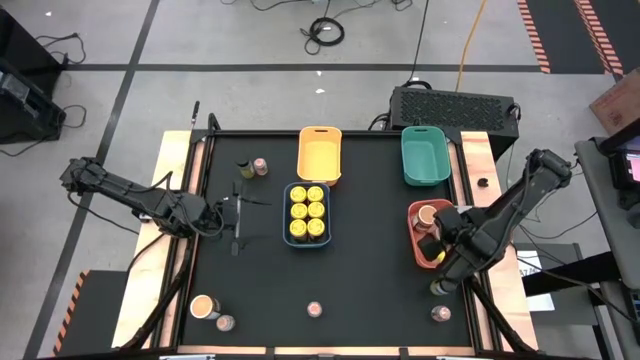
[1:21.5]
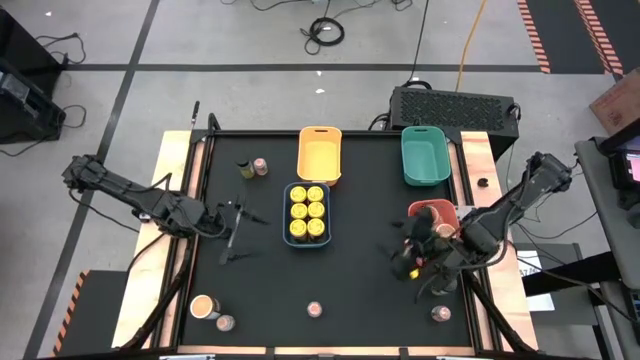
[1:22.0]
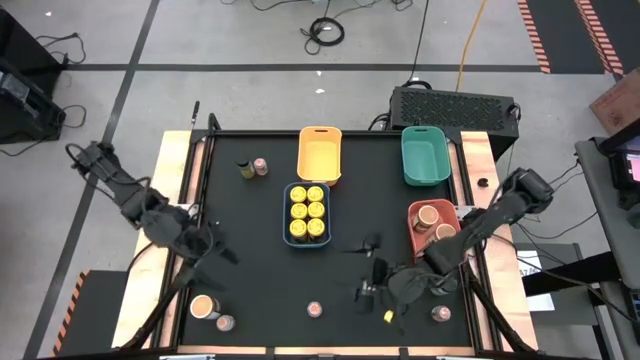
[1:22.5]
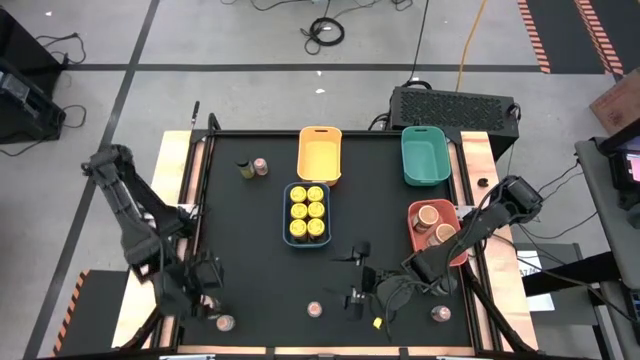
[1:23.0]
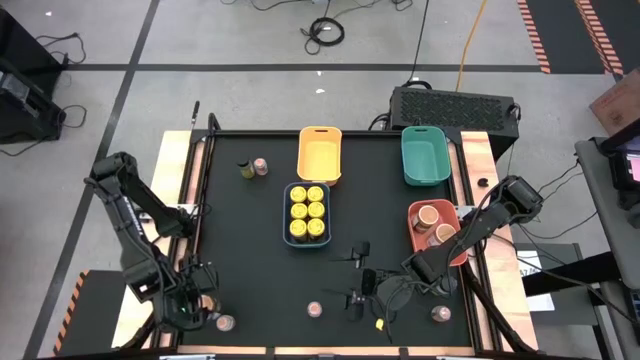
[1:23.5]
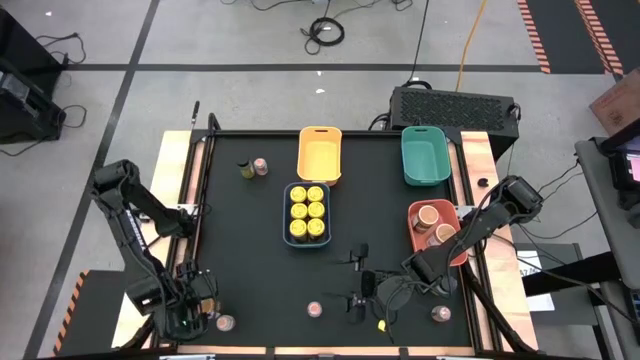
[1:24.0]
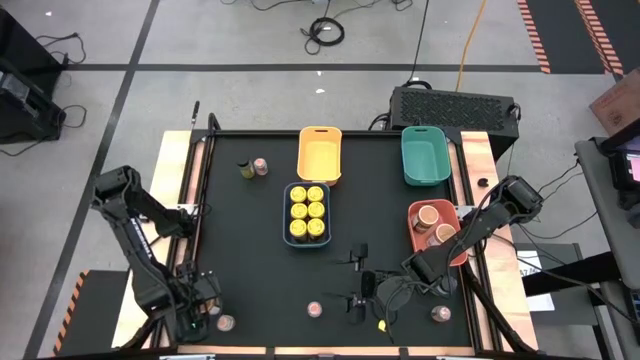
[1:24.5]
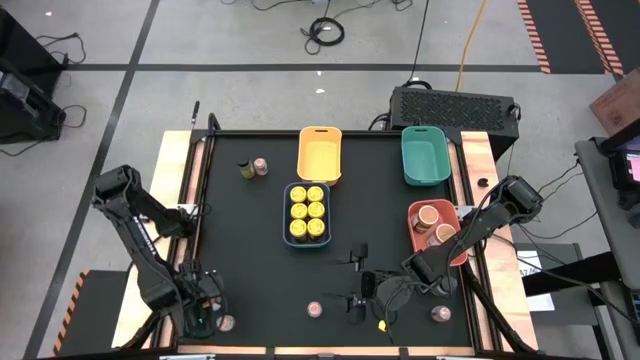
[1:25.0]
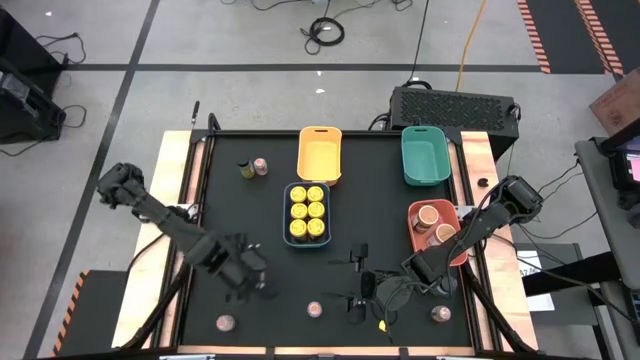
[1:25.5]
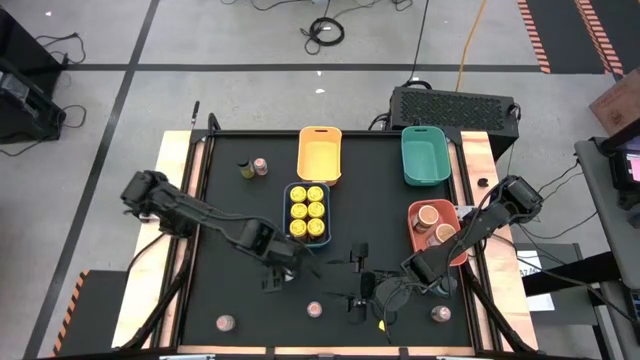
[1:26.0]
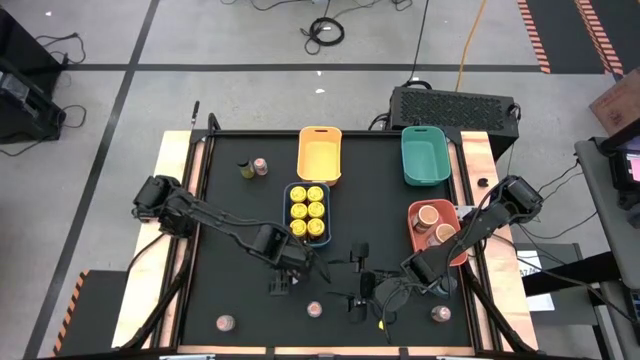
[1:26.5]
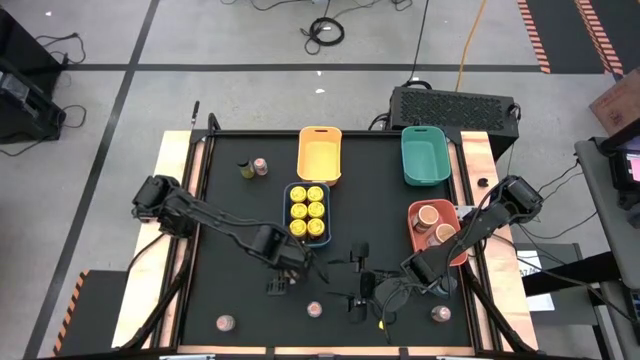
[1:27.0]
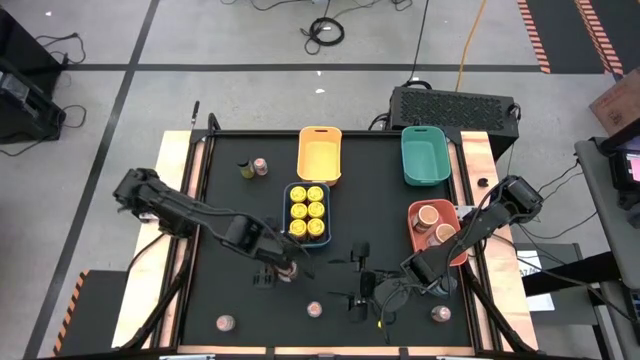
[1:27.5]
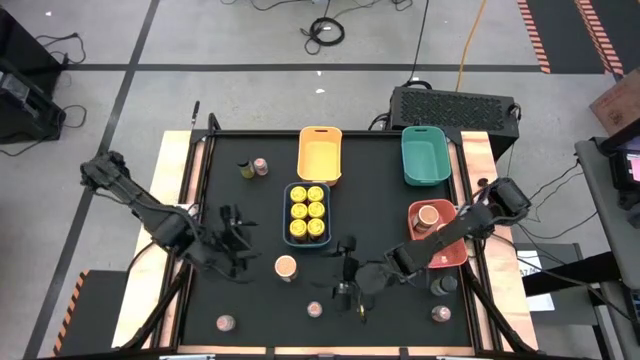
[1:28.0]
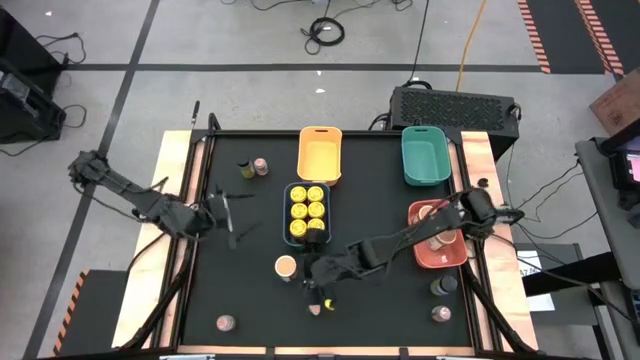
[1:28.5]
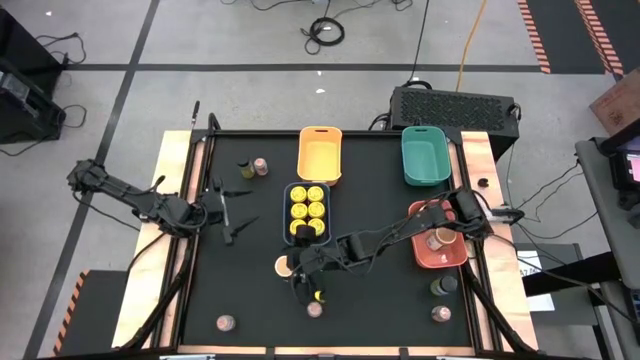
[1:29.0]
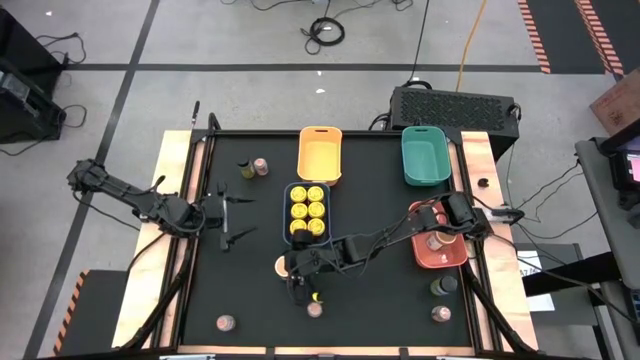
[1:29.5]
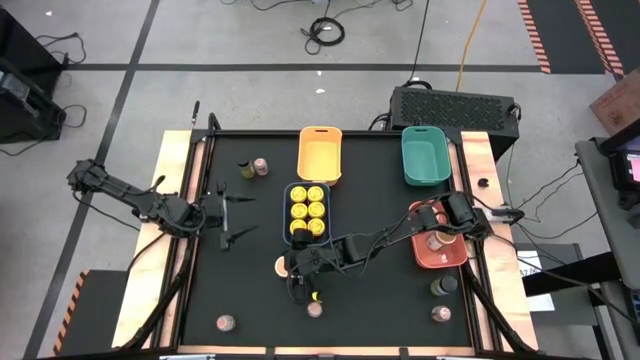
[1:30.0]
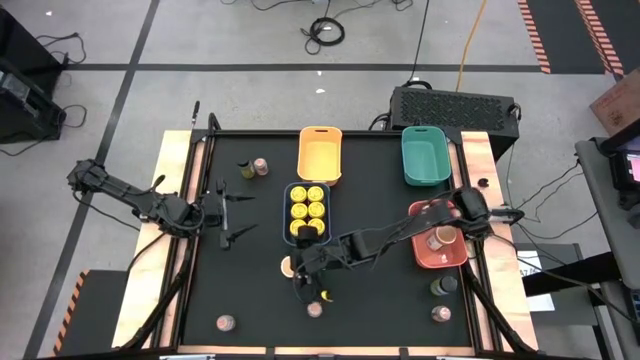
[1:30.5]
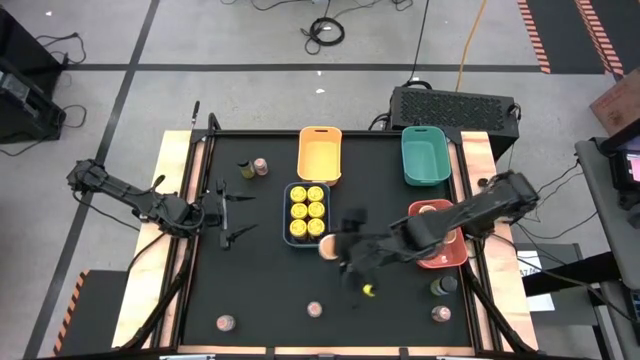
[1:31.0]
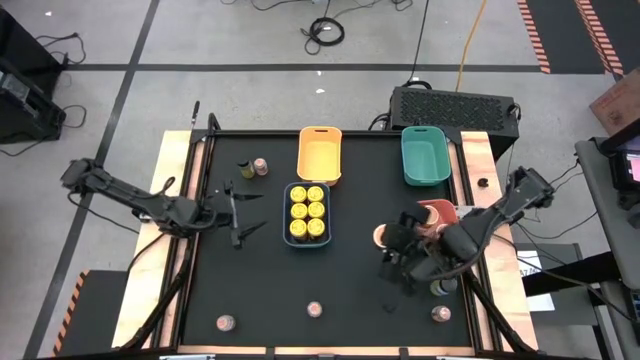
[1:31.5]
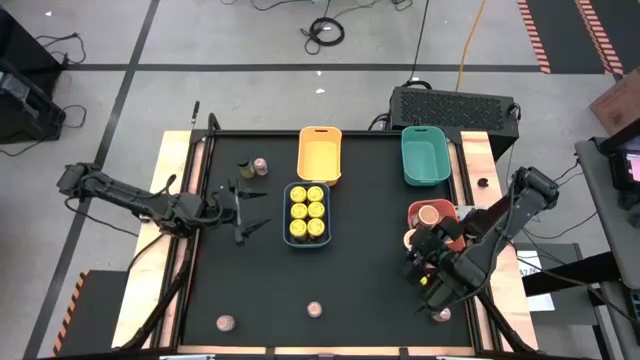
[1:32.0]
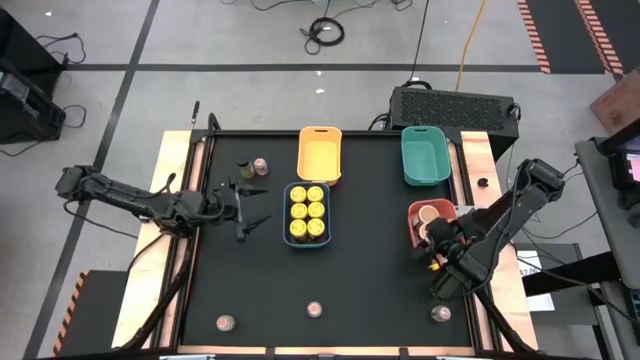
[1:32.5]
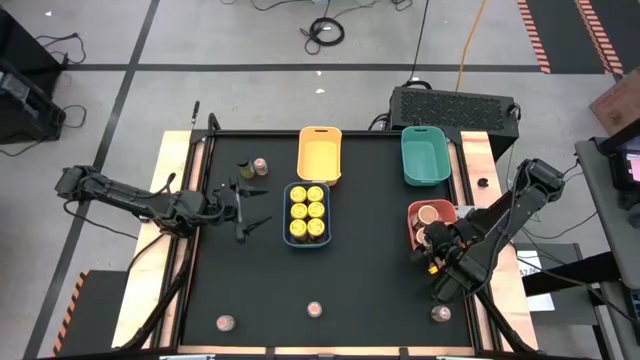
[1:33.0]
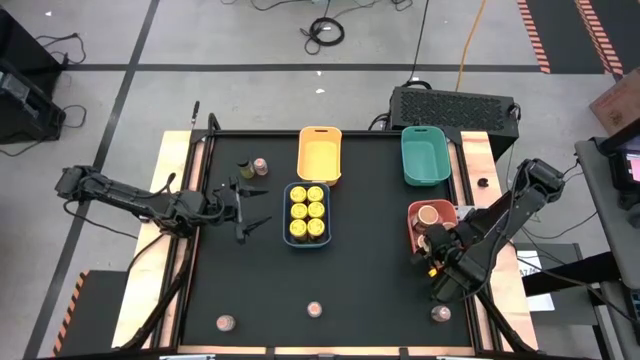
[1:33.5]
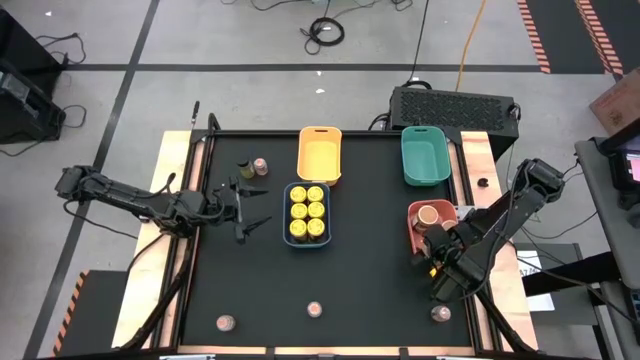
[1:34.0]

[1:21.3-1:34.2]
Task: Sort spices by type
Put the gold seasoning bottle into the orange bin

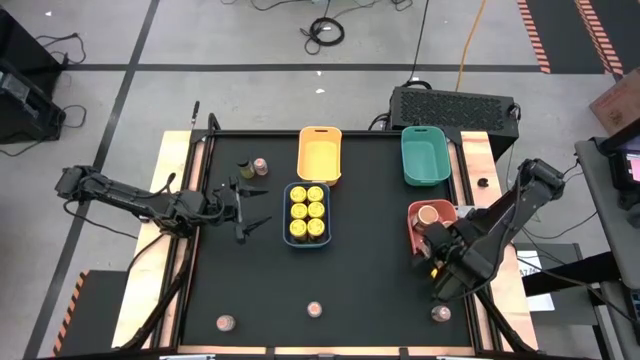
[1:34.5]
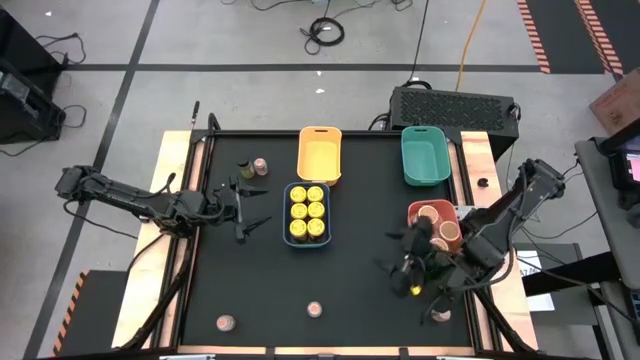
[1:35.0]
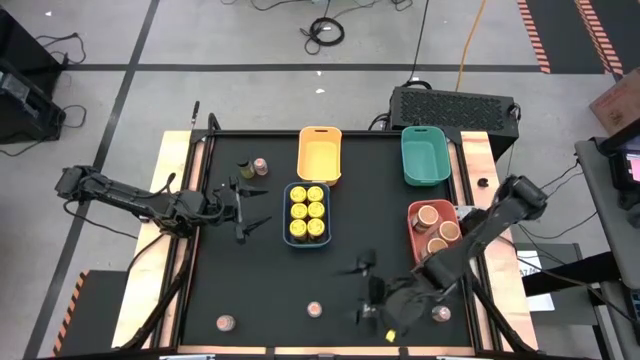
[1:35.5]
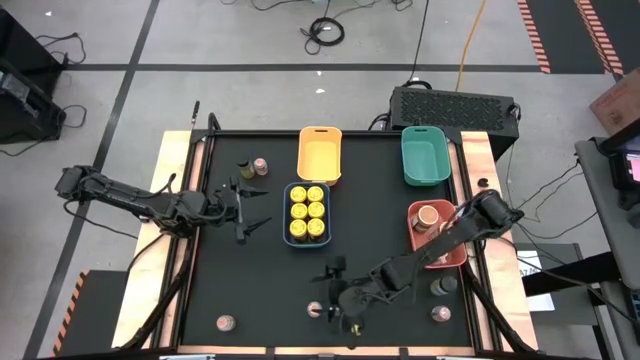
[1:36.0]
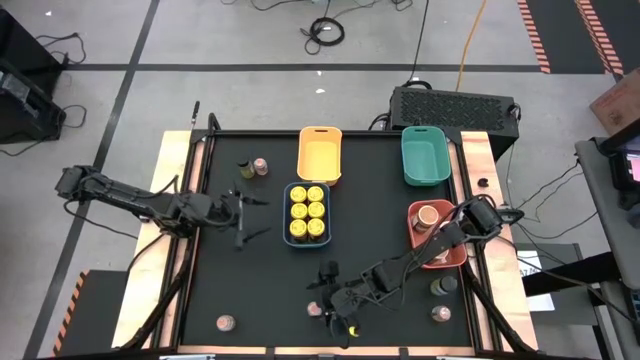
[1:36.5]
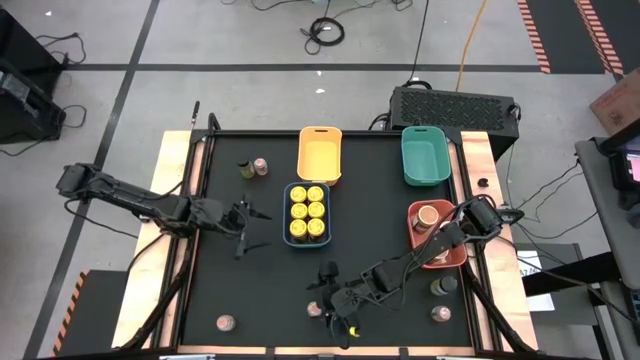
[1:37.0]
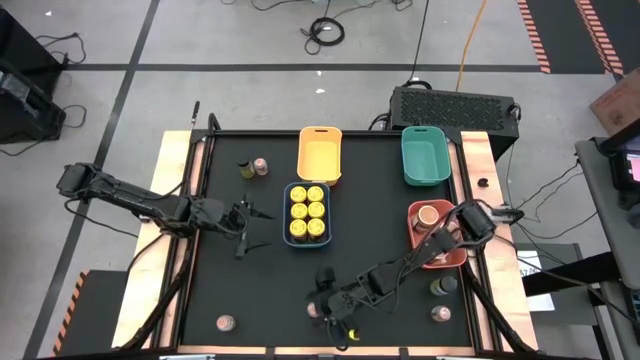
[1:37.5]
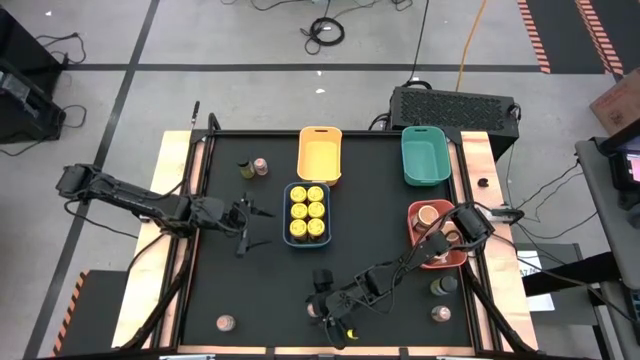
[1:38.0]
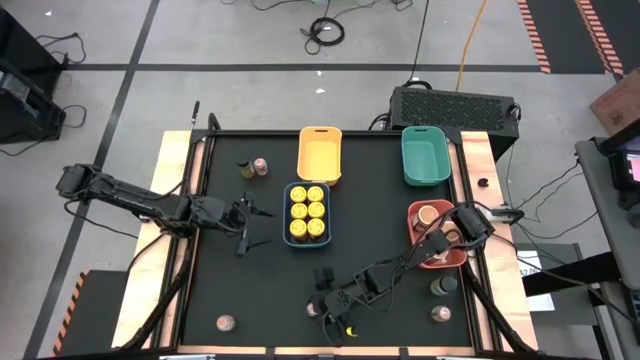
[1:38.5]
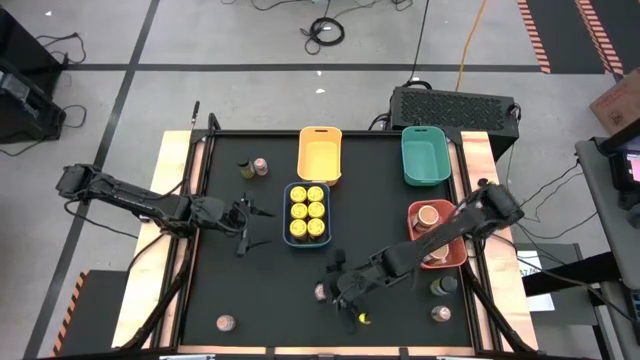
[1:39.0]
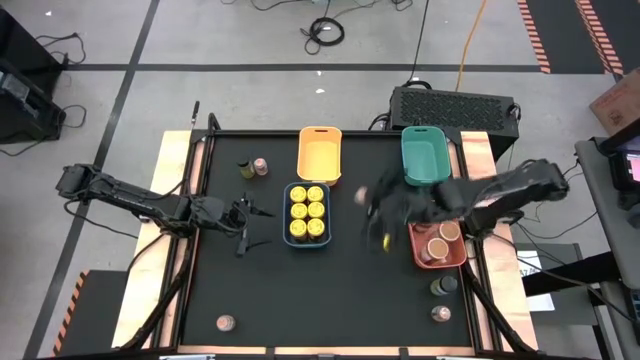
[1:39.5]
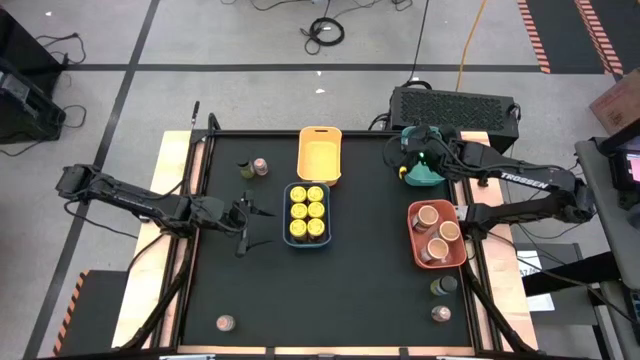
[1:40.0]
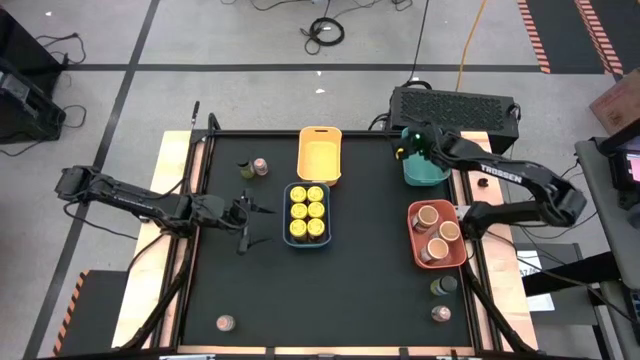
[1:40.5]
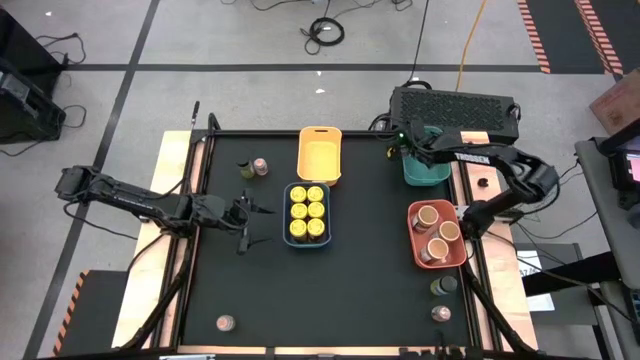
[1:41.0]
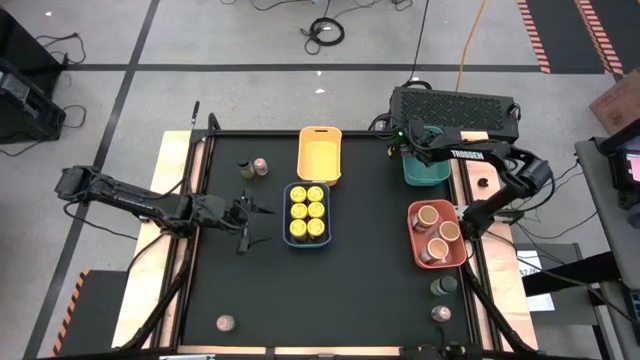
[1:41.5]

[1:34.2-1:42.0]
Put the brown seasoning bottle into the green bin

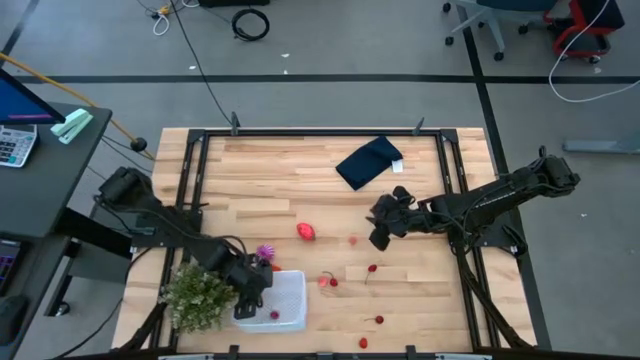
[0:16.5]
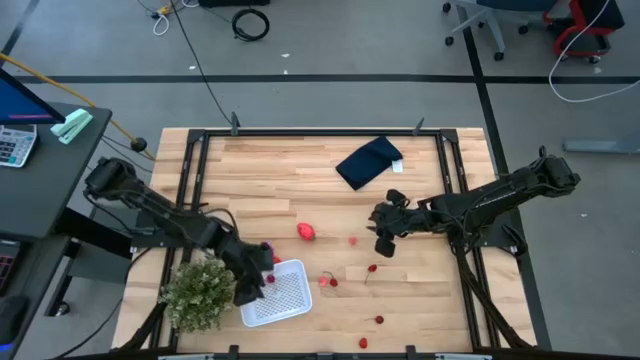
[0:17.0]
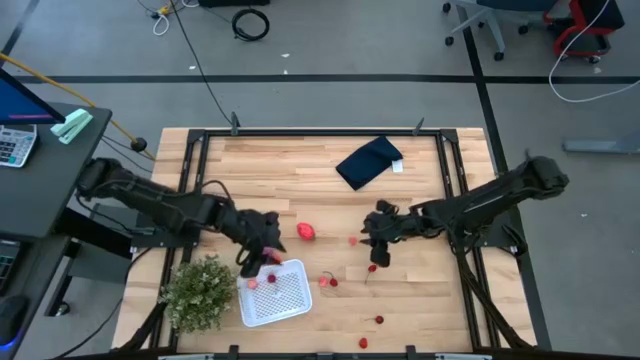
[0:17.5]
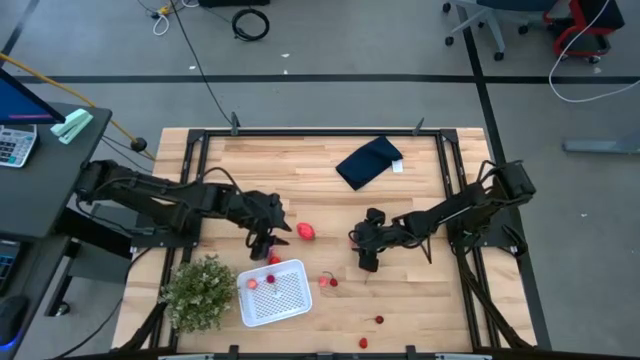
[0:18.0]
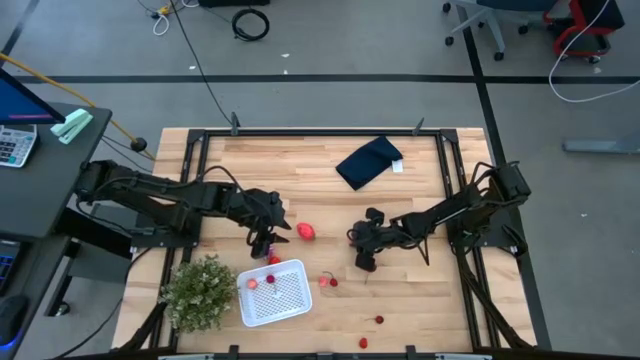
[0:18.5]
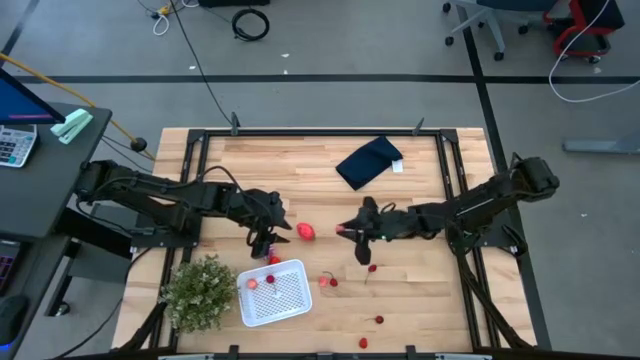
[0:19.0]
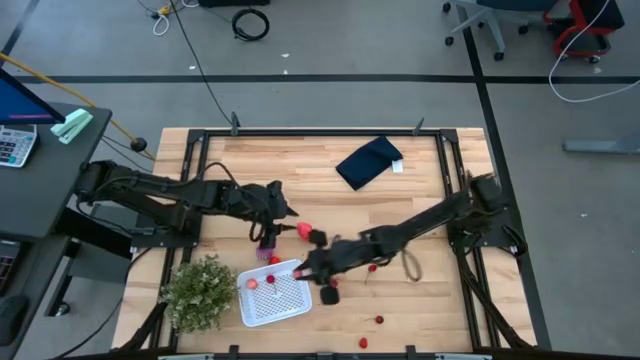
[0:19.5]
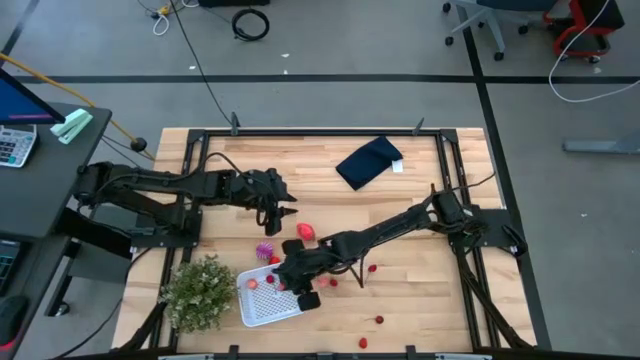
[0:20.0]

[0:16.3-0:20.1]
Task: Pick and placing Produce into tupperware
Put the peach into the white bin
